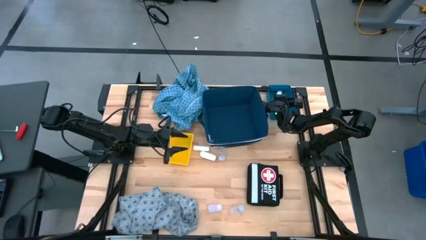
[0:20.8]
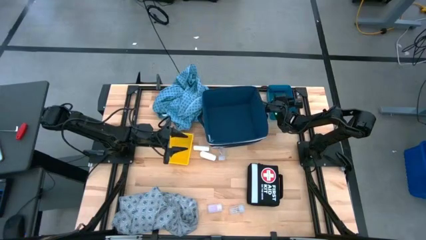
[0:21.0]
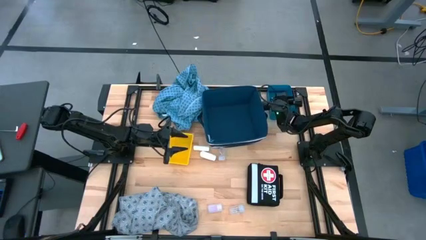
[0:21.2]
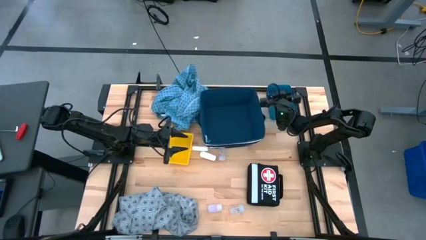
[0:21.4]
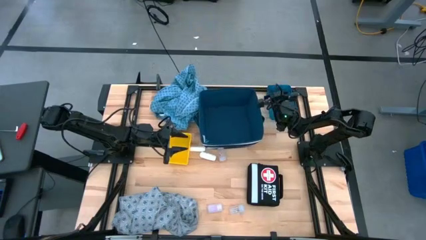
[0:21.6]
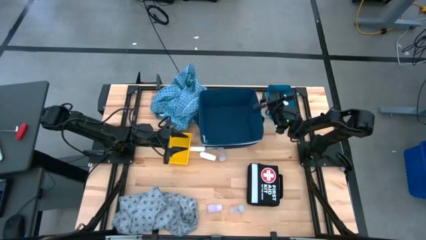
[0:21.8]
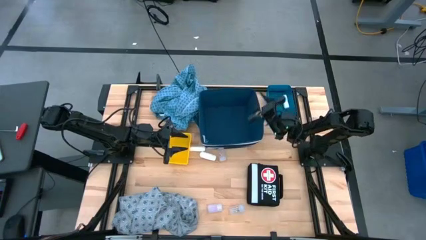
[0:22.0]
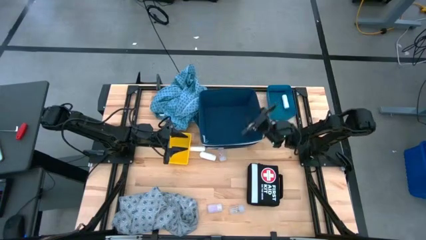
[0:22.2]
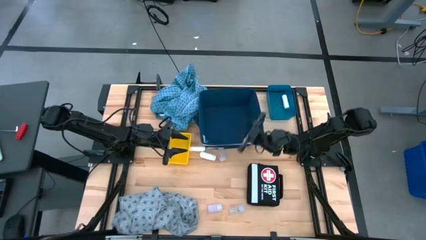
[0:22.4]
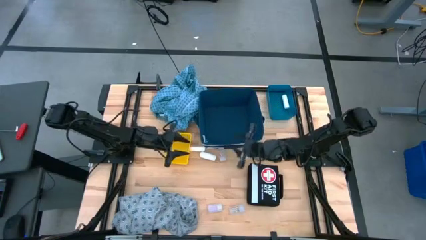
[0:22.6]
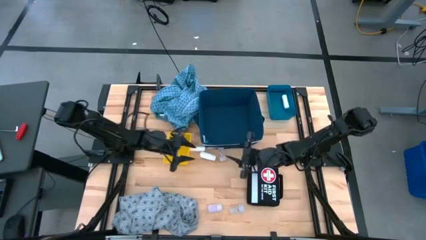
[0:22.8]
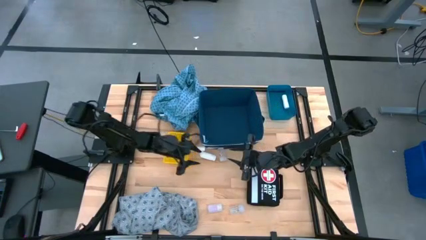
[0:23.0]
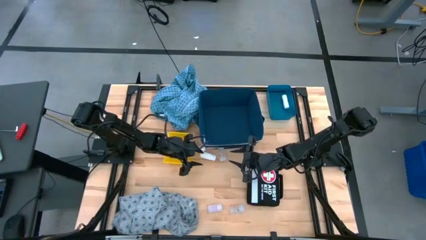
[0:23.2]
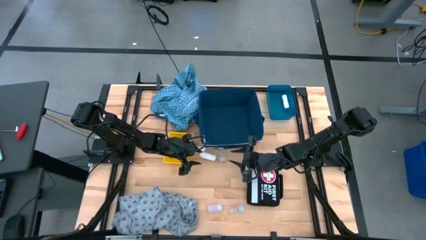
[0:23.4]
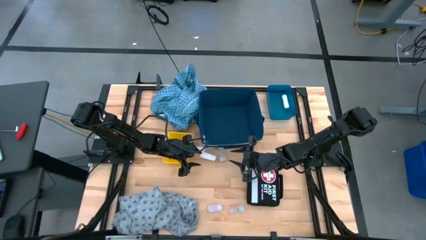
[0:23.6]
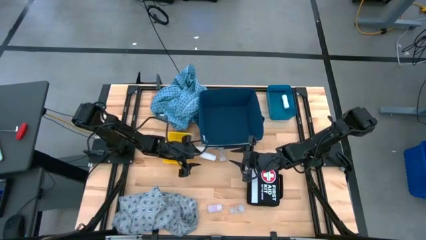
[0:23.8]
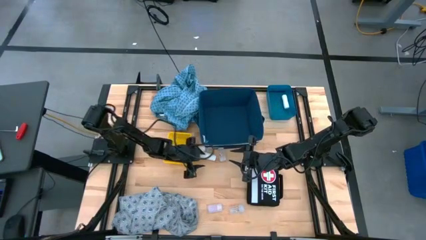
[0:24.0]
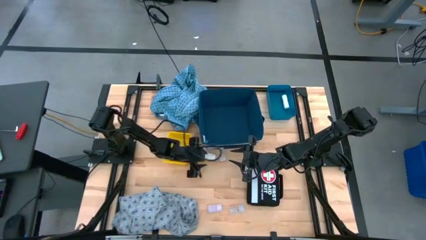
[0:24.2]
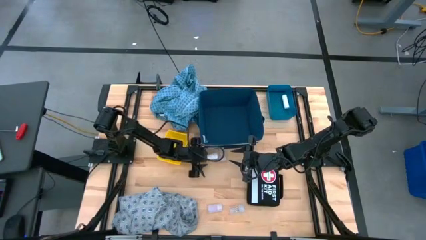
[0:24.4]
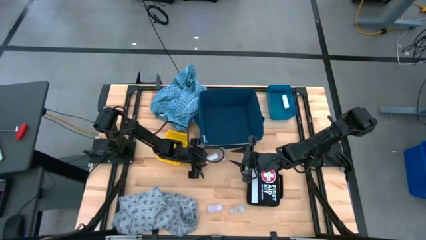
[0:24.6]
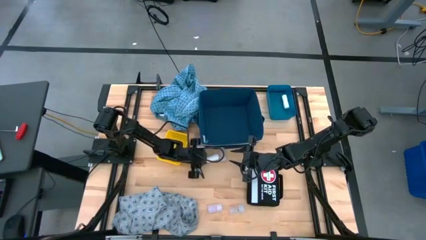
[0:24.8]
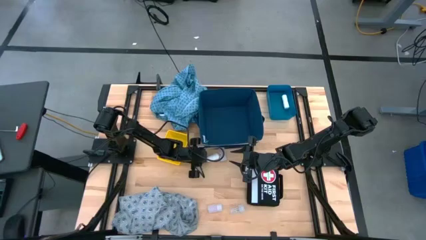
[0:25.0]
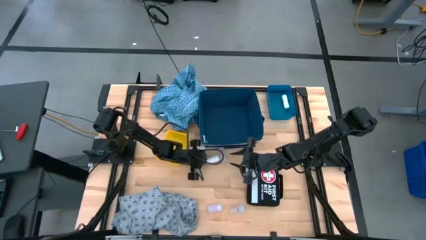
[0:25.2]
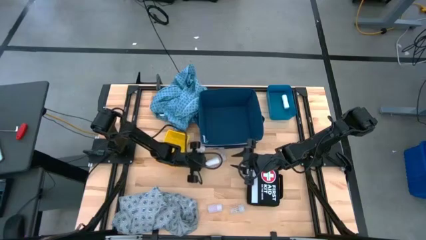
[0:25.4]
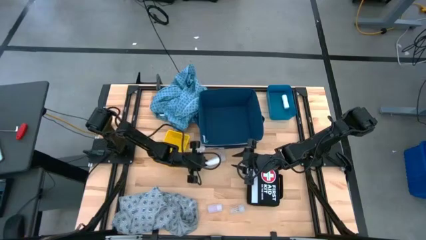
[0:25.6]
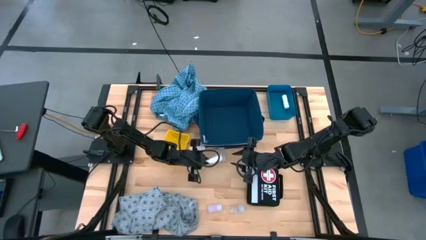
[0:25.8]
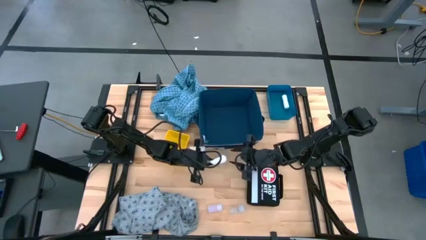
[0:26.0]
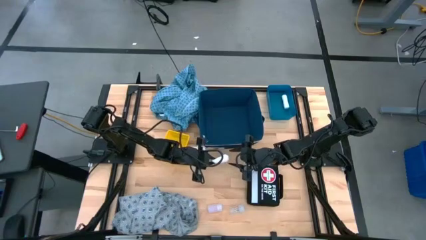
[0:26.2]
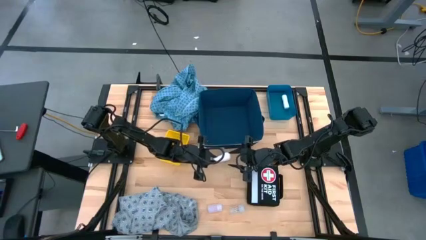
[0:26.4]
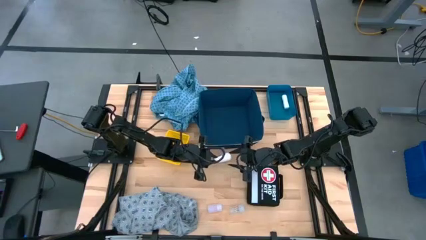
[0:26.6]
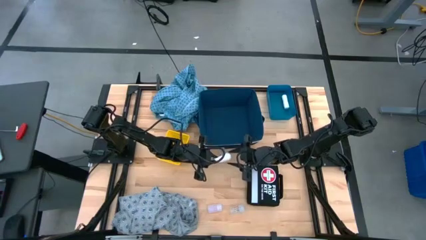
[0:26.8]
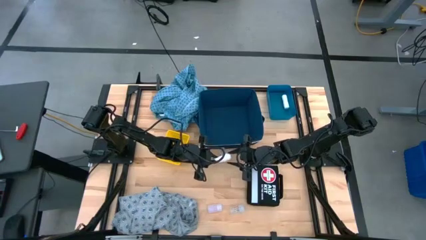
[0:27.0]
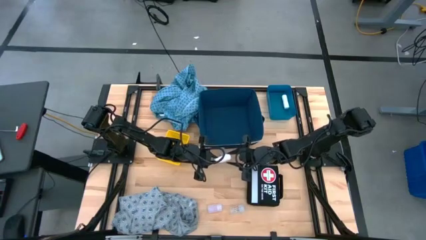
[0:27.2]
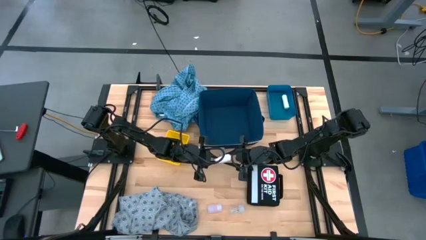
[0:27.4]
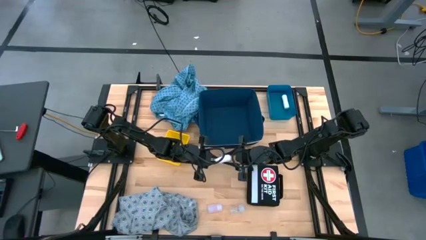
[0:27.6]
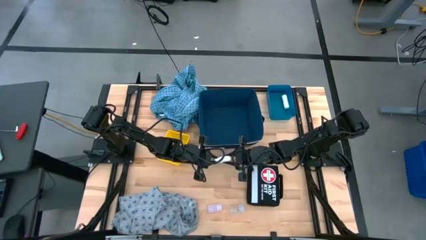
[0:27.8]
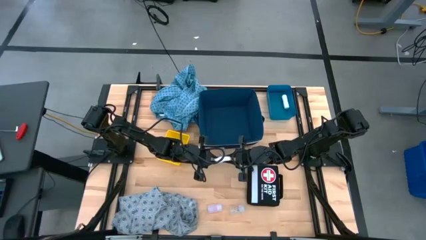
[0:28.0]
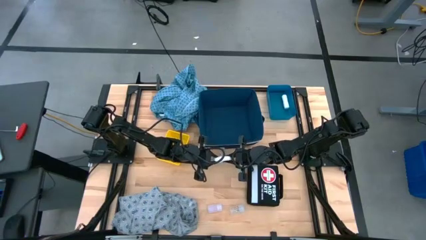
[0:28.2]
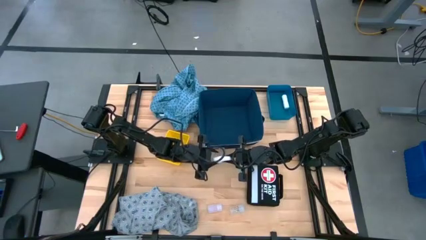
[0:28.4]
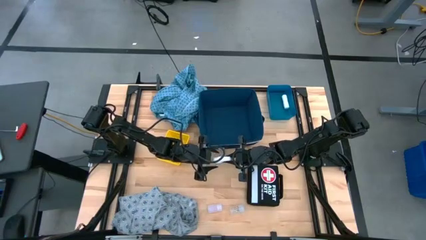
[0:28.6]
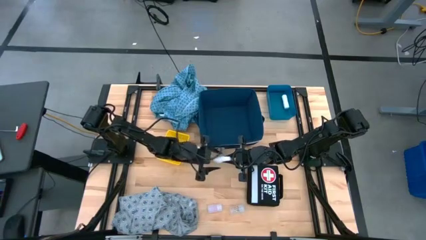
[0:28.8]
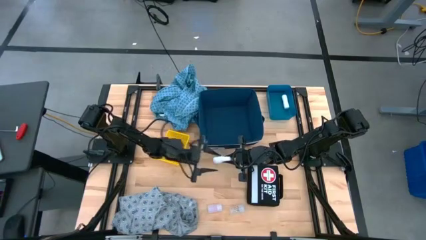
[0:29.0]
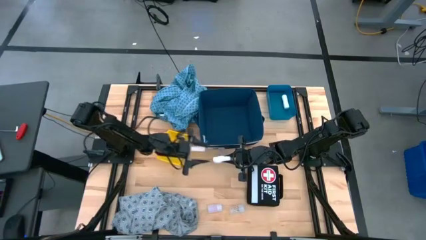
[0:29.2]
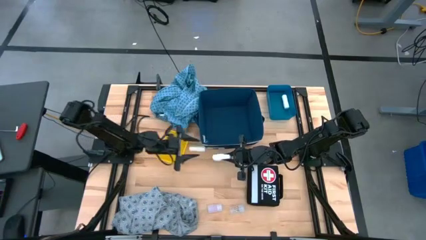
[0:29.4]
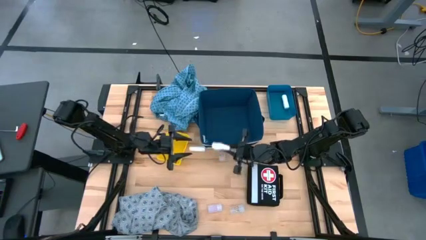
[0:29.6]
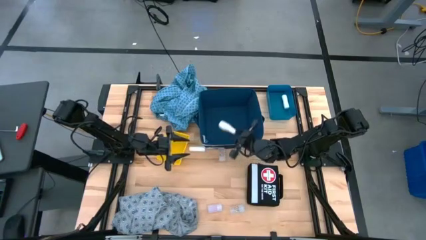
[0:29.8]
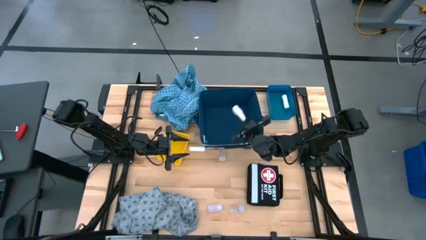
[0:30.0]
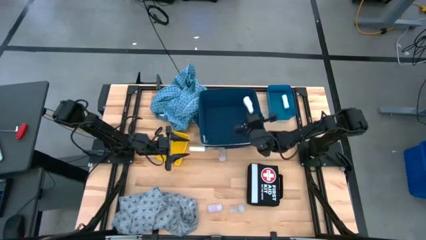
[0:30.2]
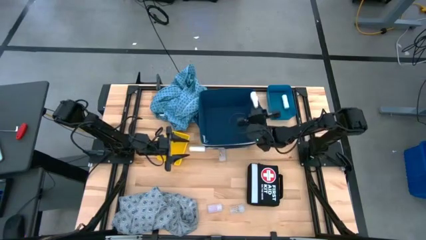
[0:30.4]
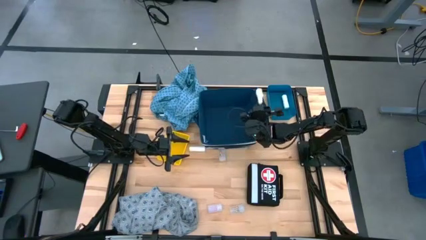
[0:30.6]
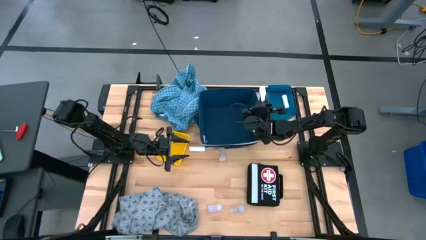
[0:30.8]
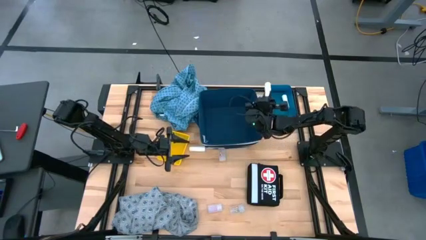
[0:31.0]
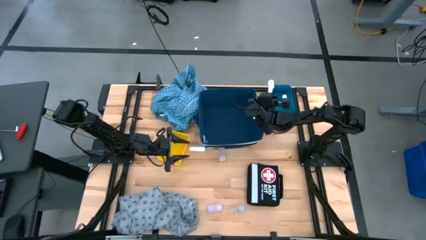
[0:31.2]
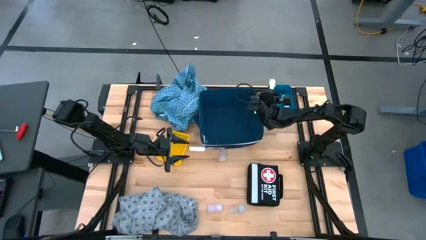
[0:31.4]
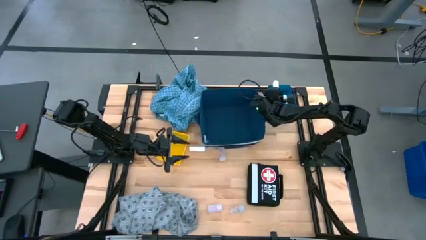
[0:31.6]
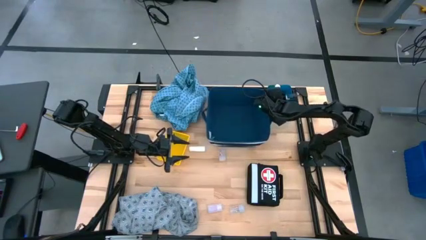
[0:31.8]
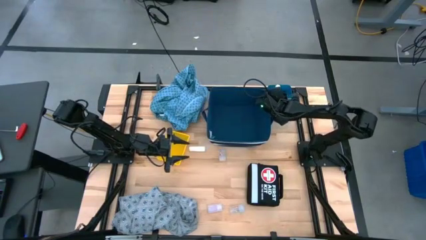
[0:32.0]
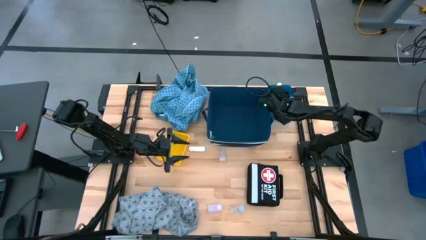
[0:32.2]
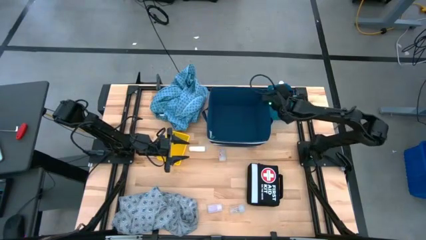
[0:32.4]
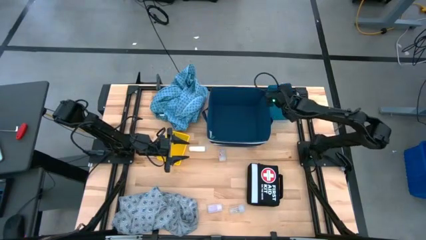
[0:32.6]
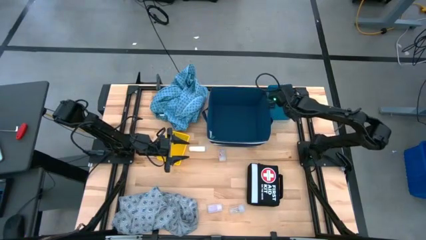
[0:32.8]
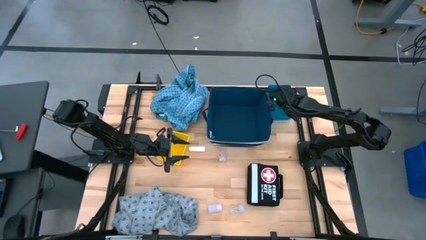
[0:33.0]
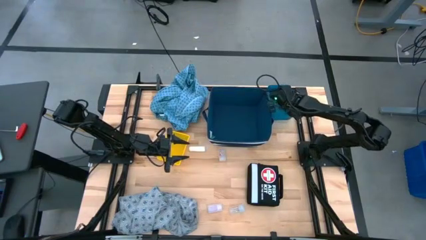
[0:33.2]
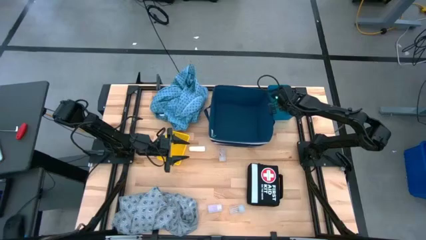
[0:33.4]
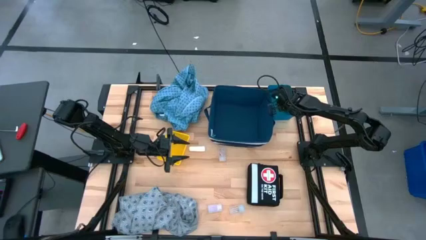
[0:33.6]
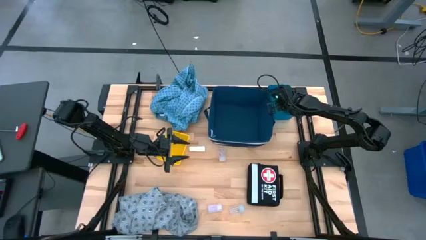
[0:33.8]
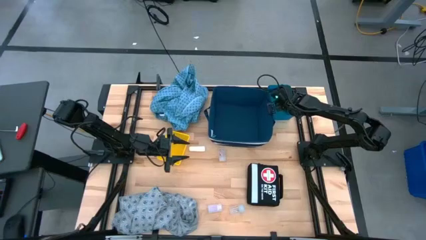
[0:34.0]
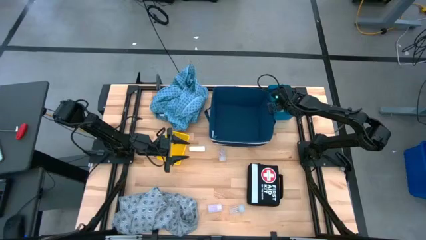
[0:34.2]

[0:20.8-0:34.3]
Task: Pick & place medical supplies in basket/bin
Put the bottom white rolled gauze into the blue bin

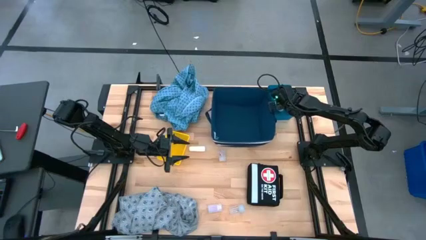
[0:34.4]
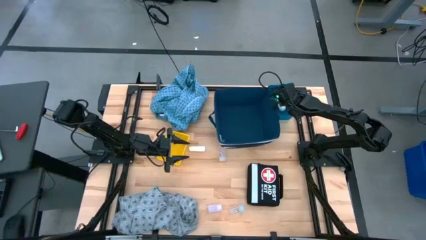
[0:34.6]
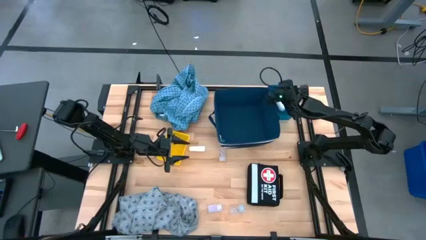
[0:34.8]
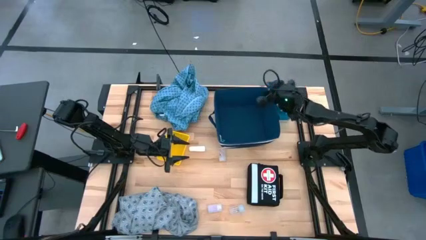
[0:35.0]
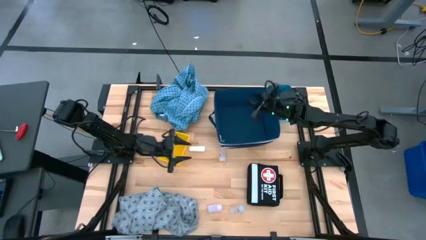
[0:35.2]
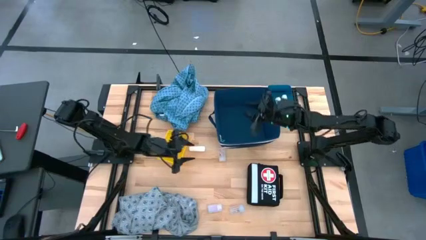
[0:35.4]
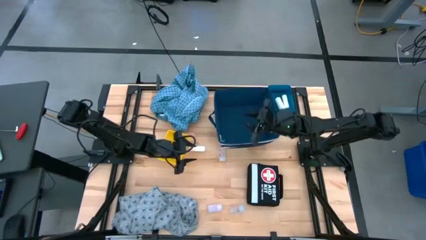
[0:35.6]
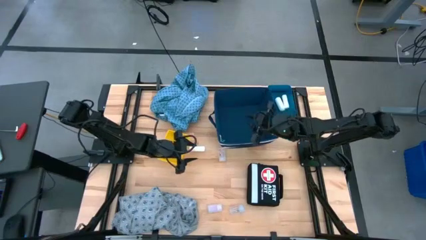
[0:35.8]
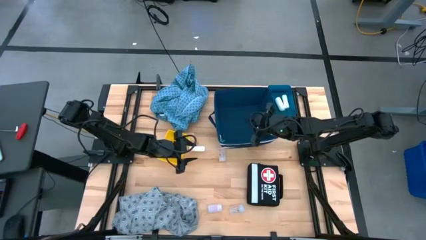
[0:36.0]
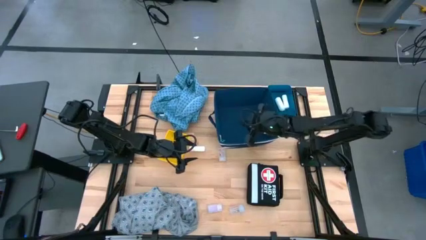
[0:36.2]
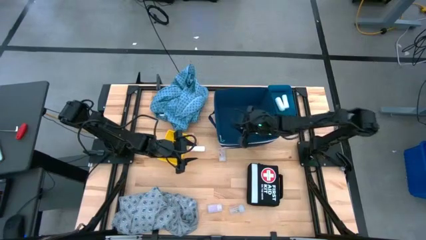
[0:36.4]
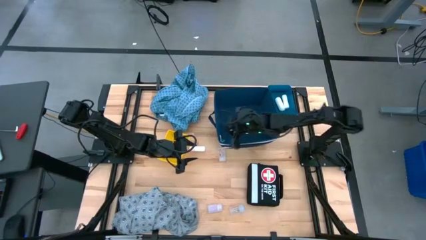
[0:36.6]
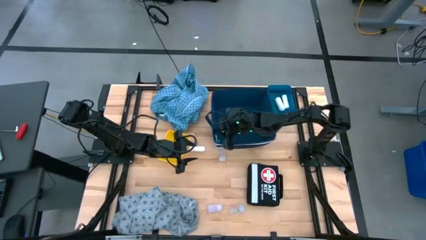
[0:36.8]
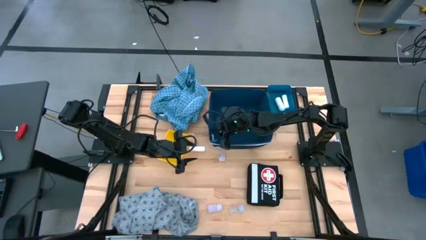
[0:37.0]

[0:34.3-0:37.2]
Adjust the blue laundry organizer
